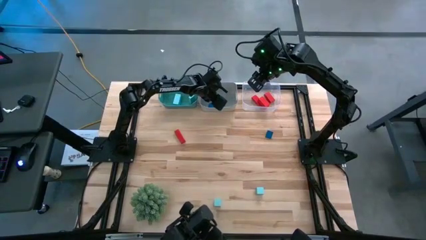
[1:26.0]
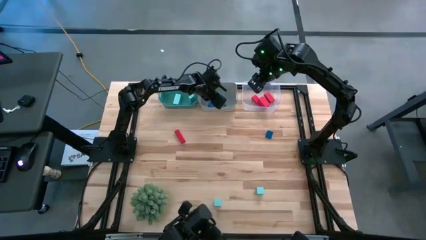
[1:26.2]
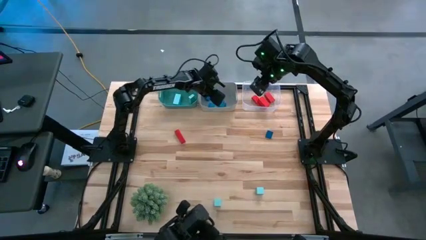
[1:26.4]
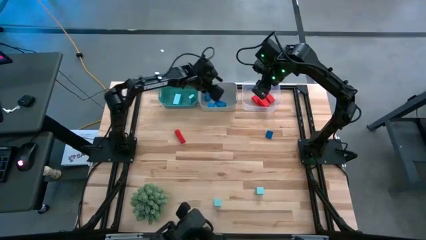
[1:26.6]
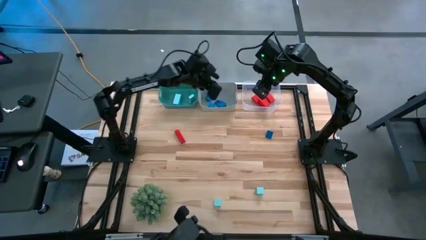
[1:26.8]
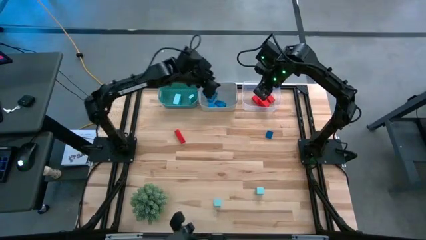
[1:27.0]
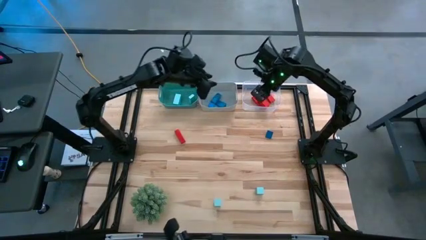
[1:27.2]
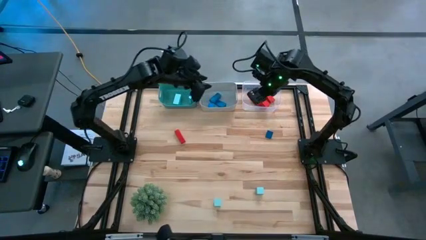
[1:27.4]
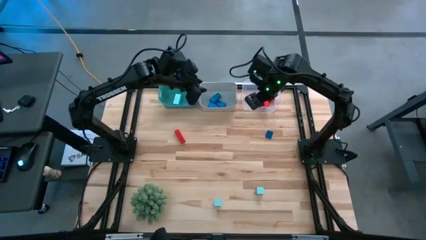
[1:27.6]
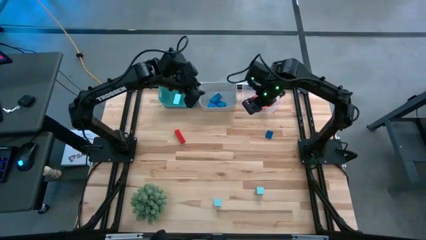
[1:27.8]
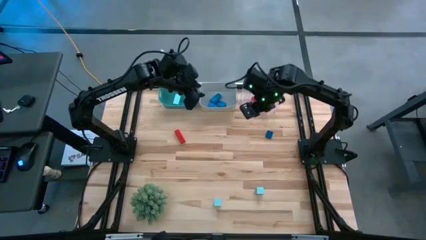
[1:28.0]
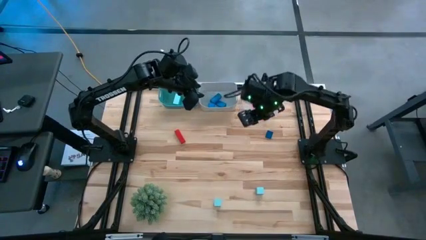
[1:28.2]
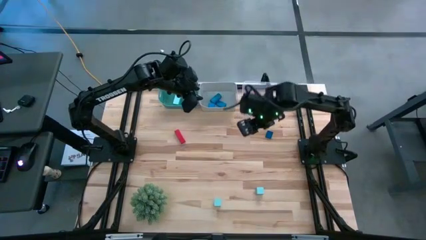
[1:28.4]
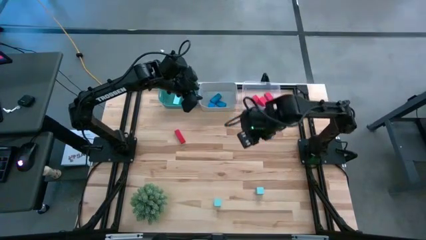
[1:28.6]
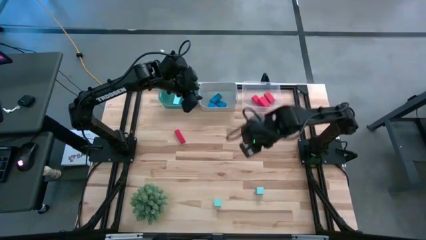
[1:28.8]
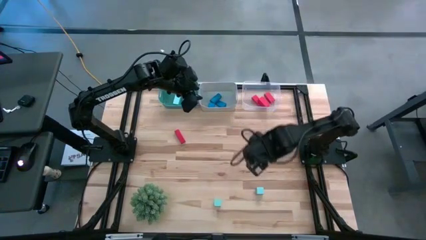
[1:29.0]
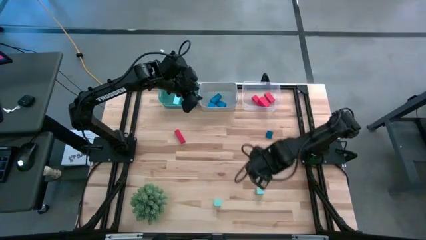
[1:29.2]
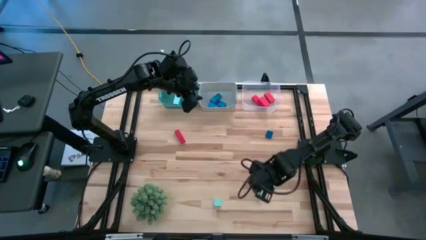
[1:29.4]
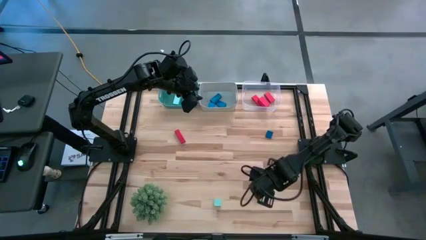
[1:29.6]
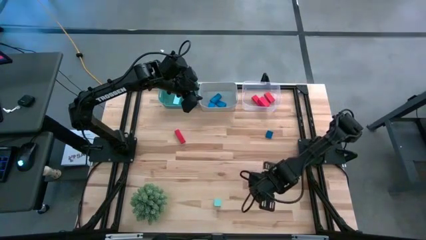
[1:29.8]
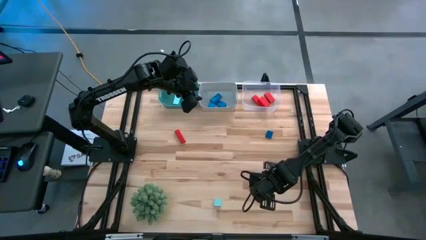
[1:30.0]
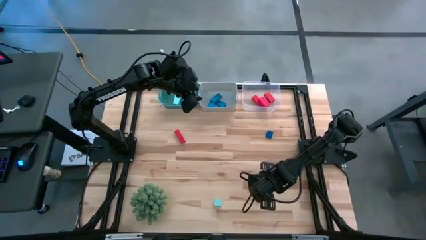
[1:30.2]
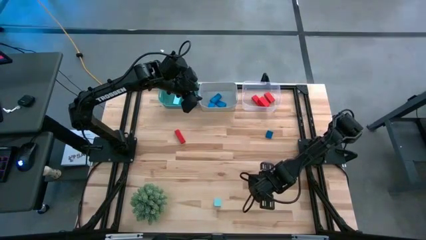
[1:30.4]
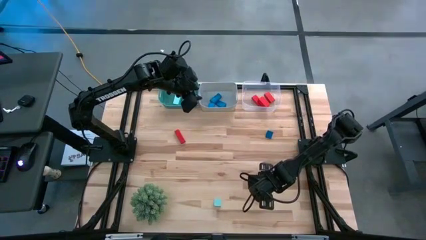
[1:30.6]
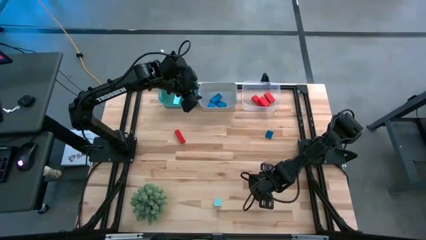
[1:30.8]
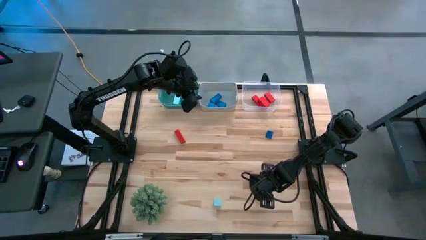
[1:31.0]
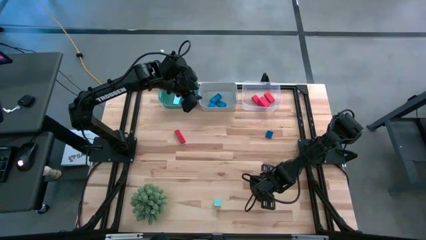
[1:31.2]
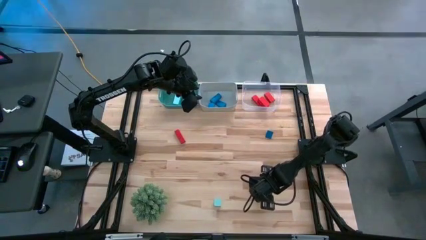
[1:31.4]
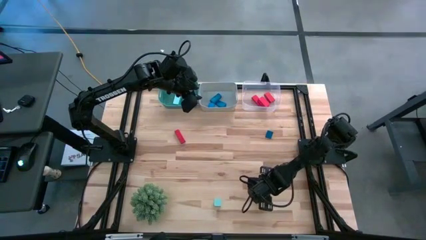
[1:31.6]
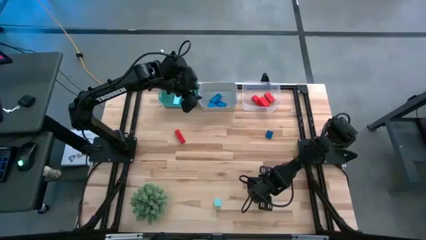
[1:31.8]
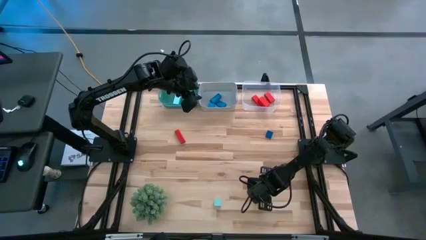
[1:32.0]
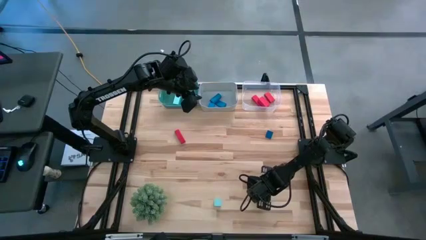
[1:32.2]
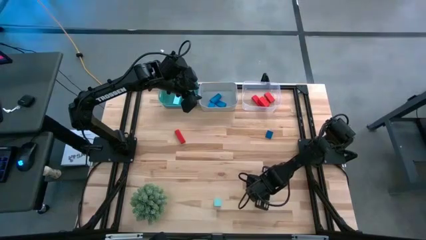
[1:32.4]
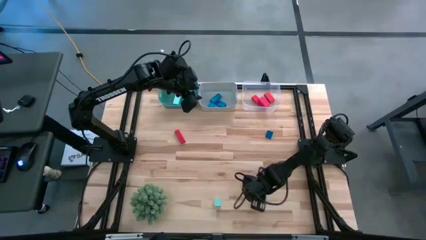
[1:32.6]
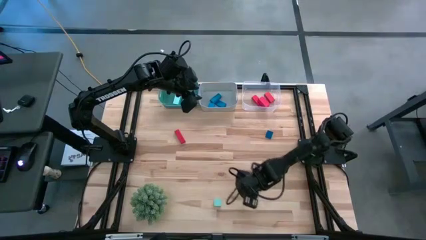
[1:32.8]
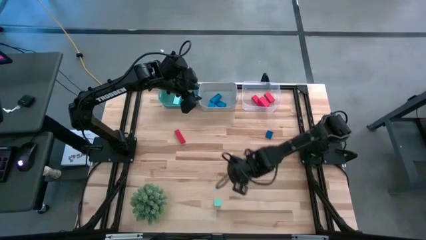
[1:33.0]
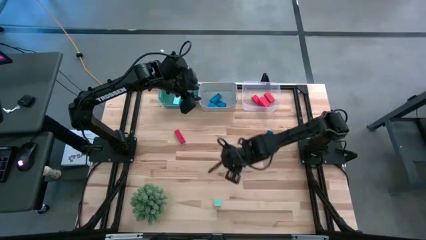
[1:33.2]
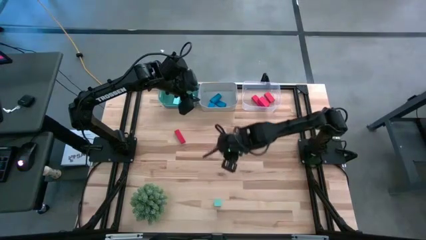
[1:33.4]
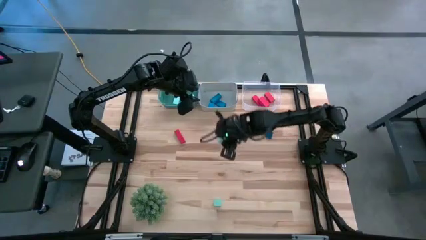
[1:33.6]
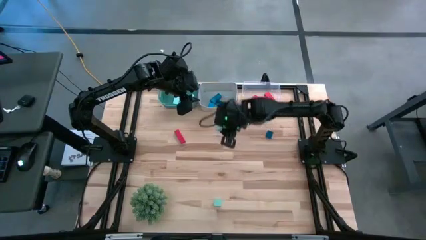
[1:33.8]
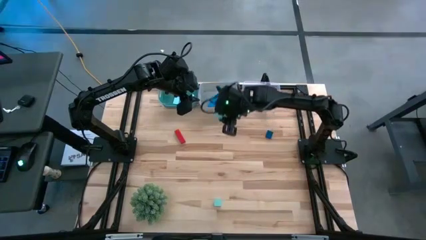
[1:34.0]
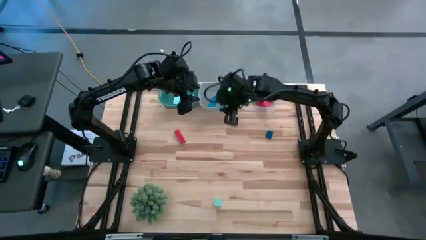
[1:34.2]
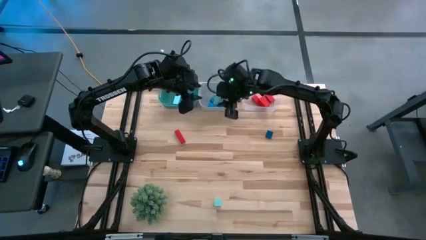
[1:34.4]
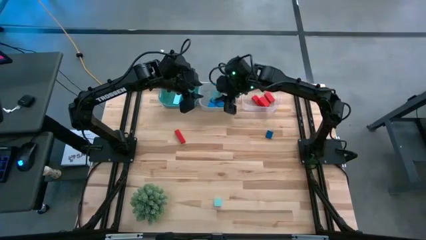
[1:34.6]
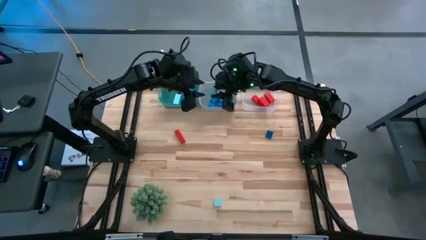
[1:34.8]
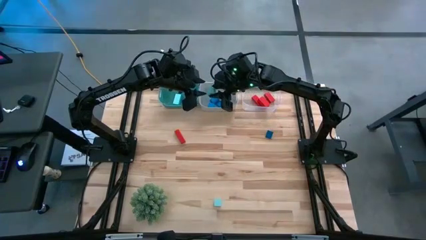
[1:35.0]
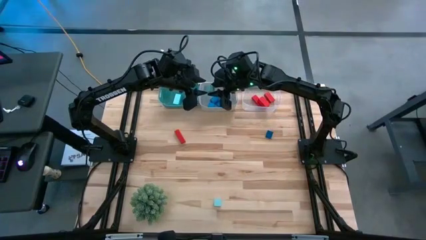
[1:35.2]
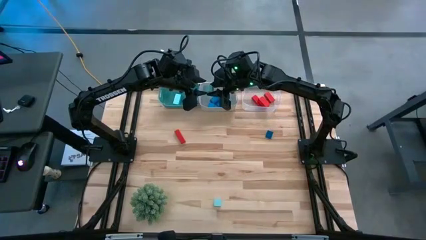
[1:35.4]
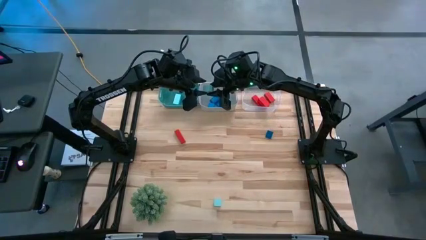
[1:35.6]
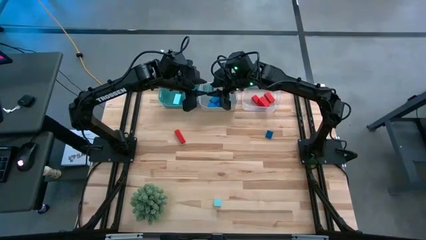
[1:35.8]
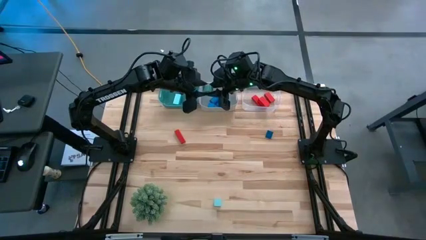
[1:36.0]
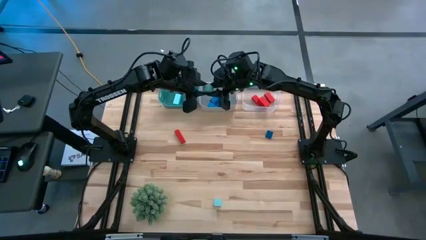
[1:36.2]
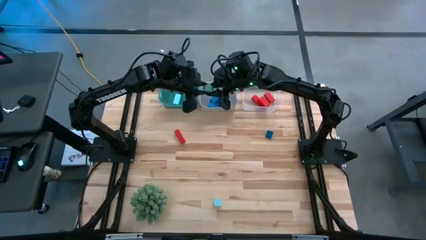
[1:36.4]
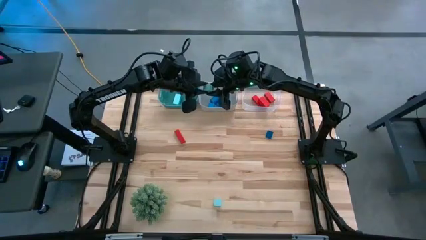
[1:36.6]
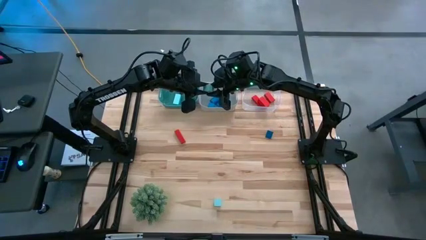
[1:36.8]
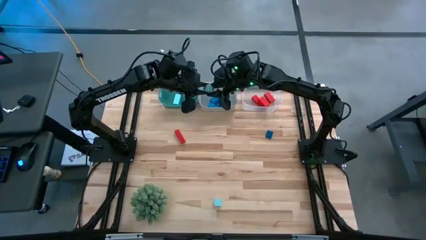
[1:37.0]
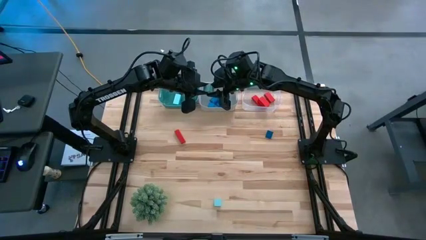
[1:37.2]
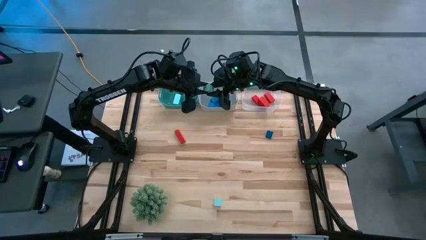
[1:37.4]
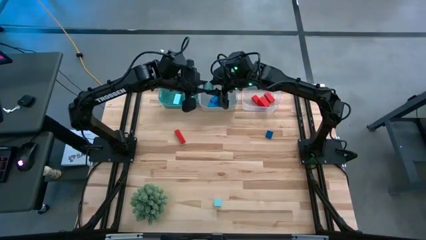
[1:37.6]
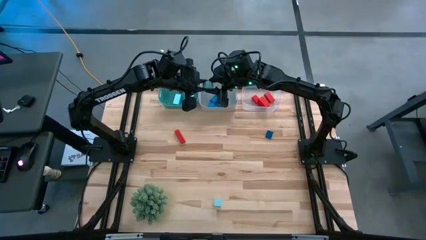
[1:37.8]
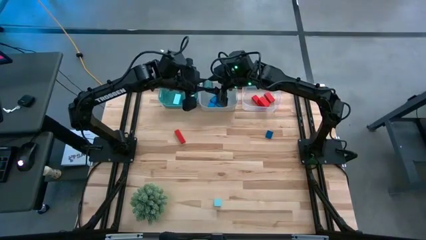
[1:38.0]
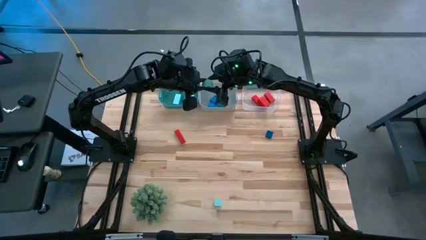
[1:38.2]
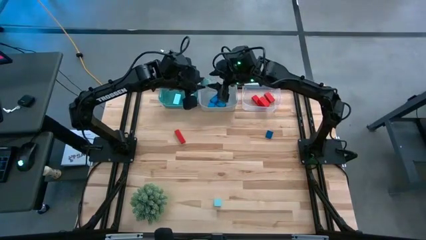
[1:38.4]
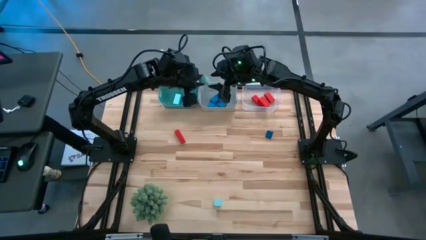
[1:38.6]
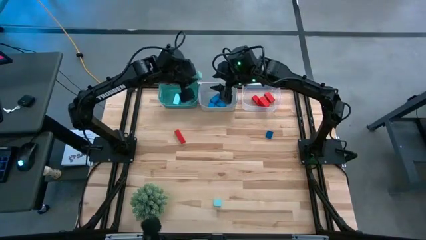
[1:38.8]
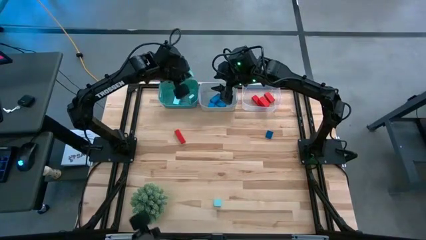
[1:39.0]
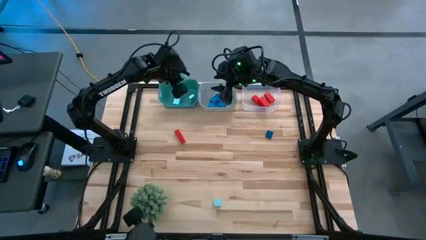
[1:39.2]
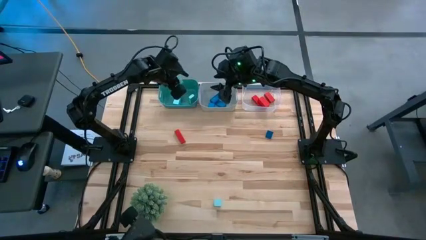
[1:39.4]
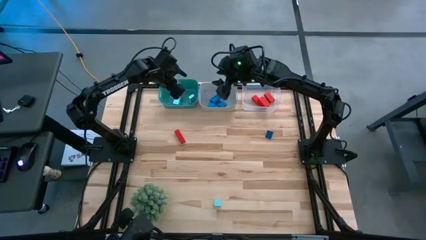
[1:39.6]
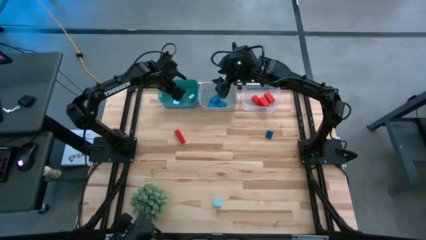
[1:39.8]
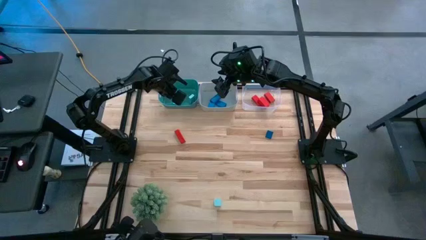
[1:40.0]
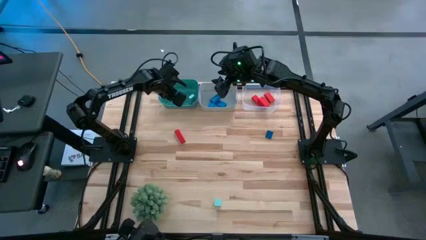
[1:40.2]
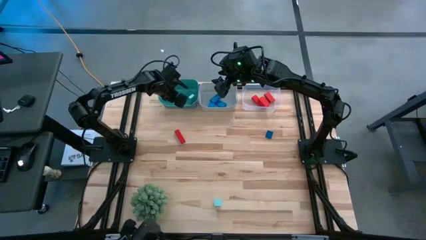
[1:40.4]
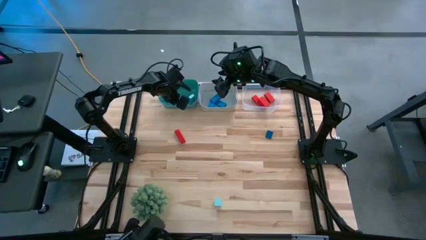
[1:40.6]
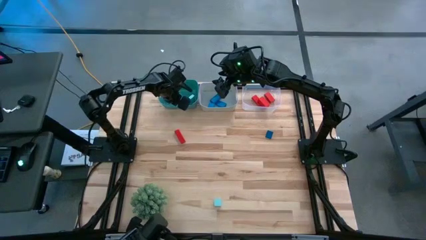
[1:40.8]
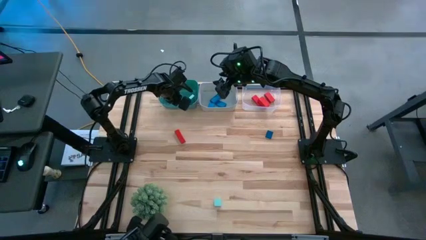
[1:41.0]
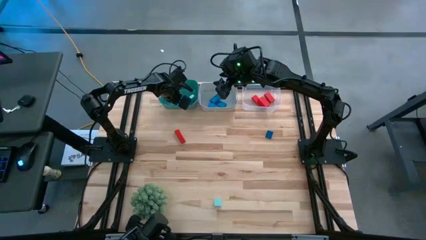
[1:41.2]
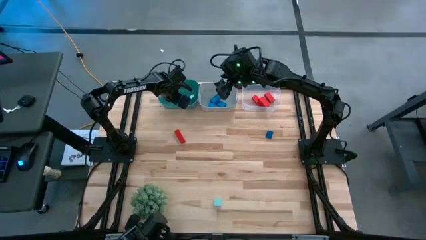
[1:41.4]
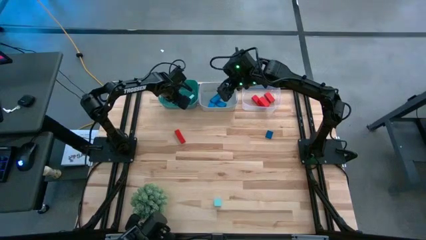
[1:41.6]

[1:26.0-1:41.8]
Task: Sort & place blocks by color
Put the light blue block into the green bin
